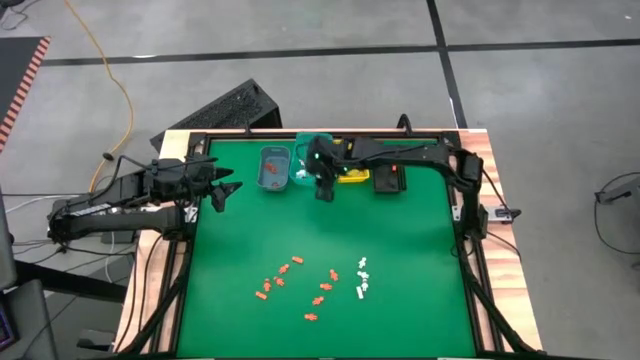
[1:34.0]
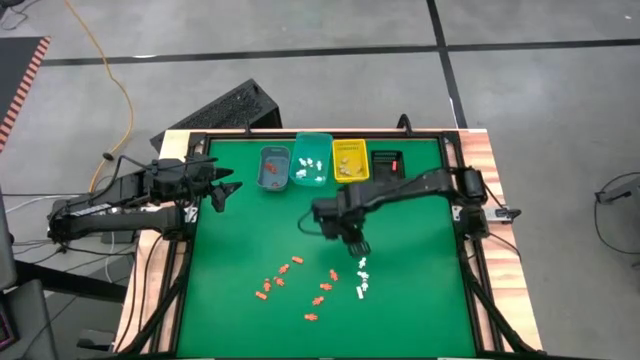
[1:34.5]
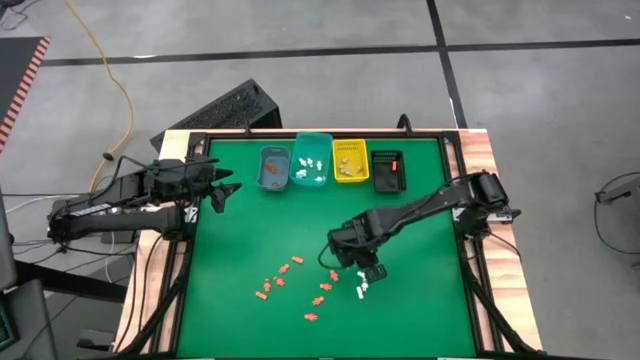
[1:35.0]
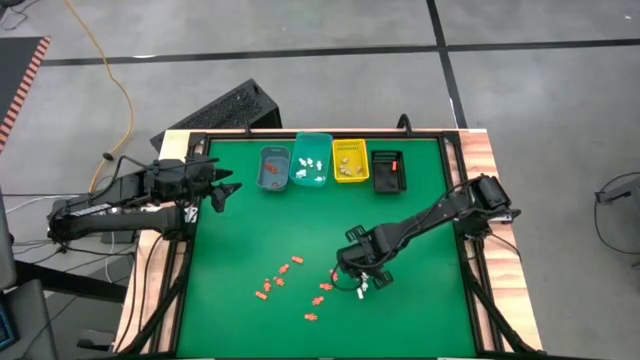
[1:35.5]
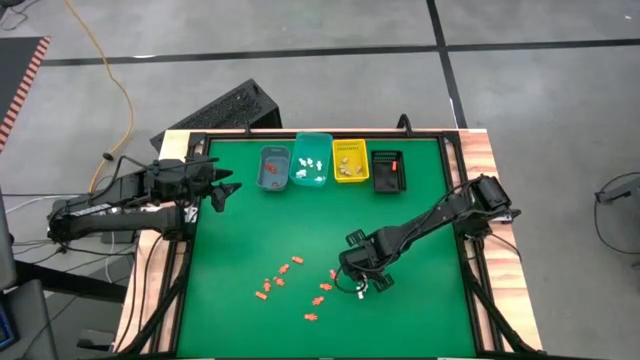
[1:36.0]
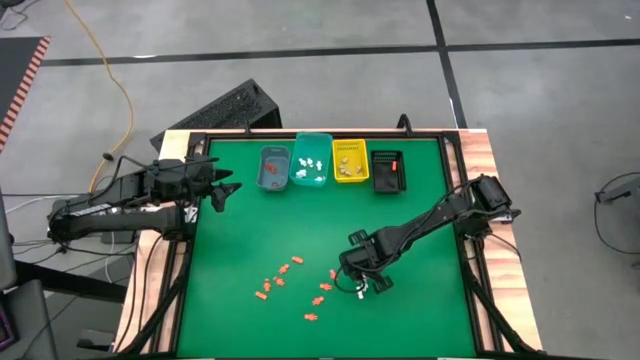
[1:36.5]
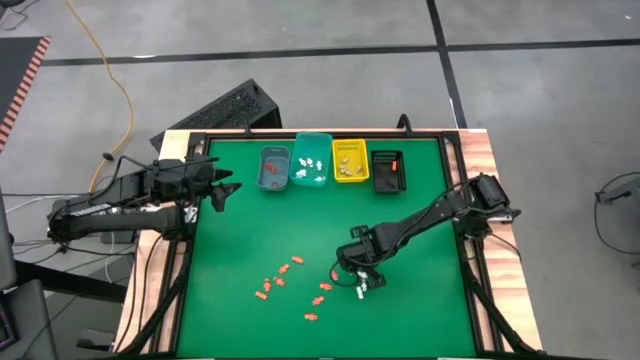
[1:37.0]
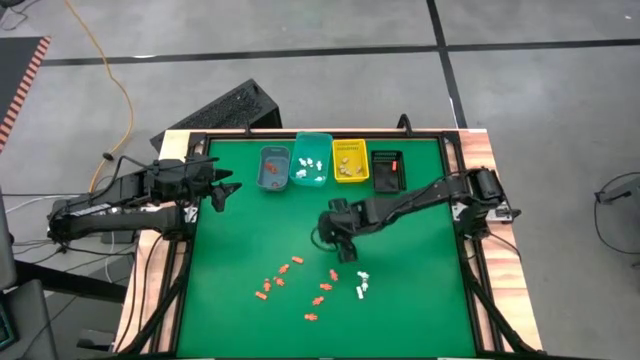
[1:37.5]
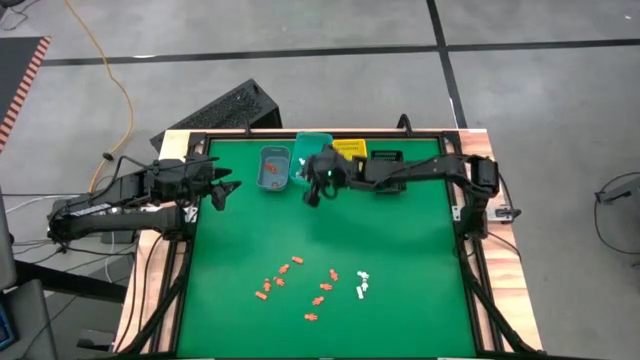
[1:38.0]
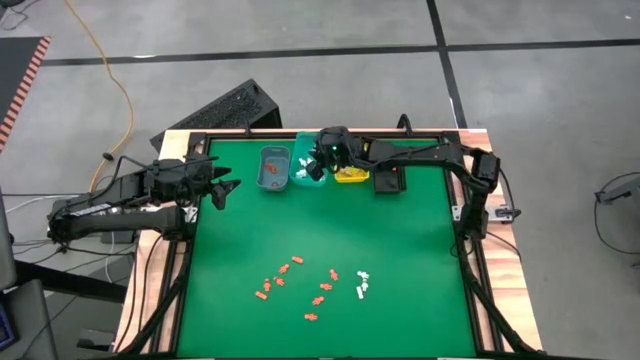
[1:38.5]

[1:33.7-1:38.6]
Task: Sort Halloween decoration
Put the white skeleton toy into the blue transparent bin

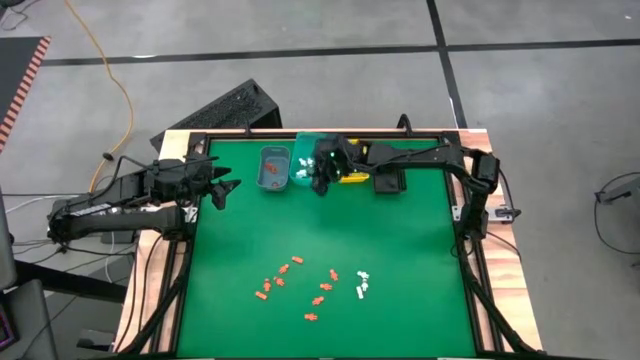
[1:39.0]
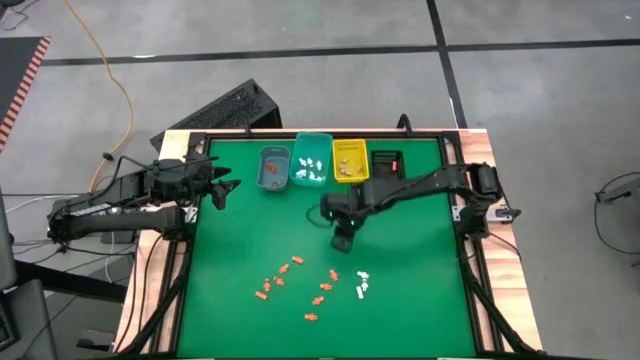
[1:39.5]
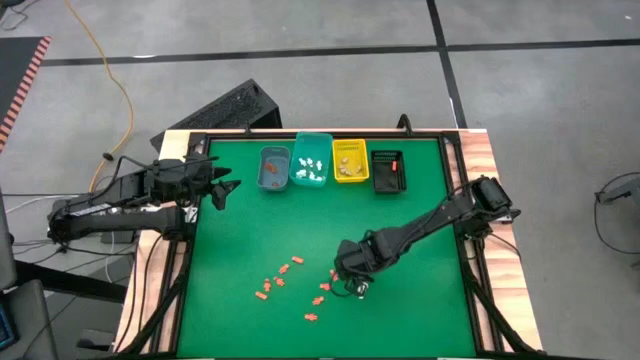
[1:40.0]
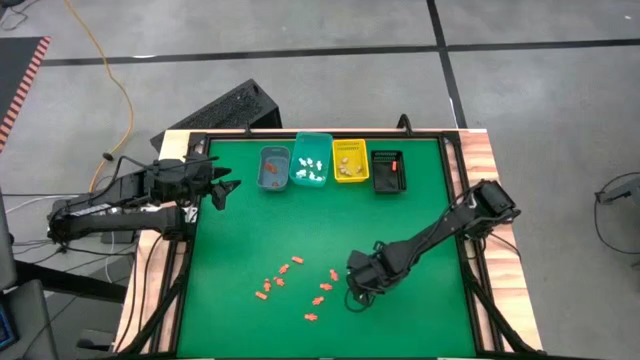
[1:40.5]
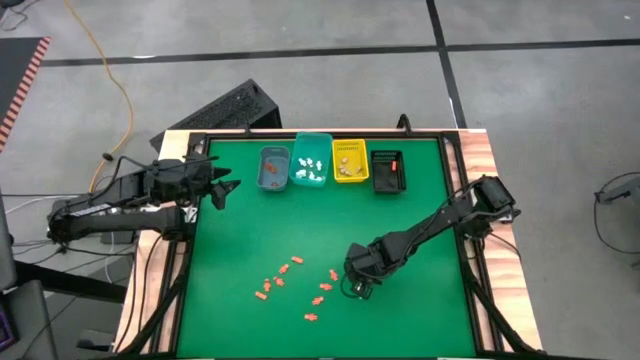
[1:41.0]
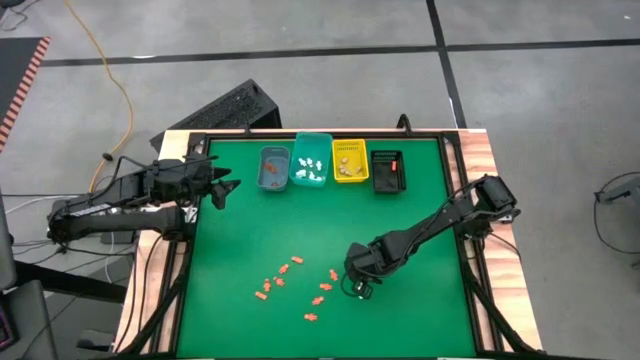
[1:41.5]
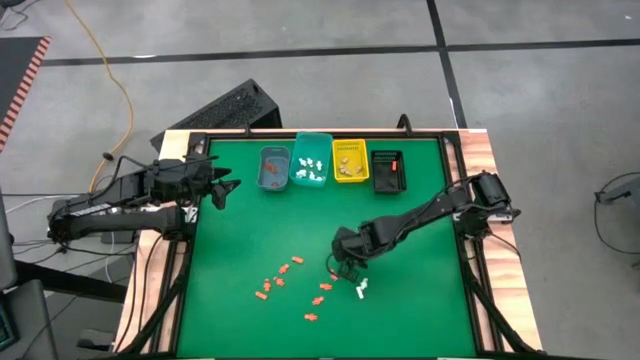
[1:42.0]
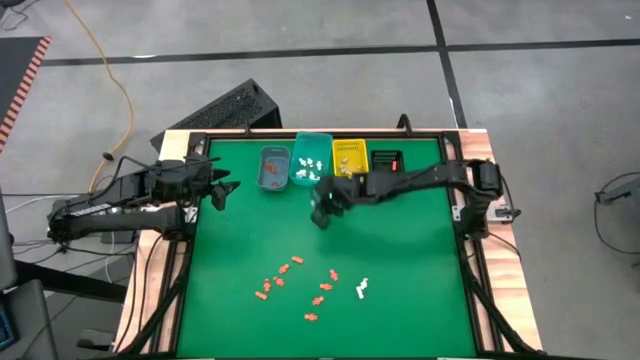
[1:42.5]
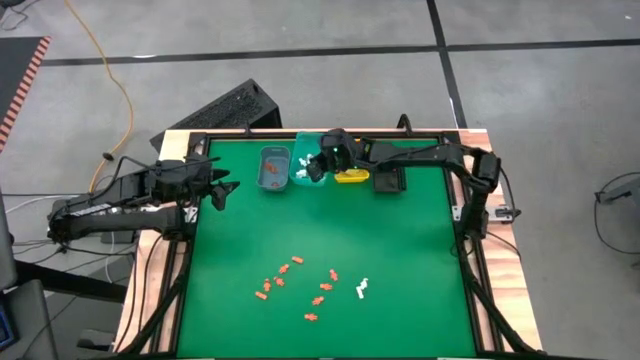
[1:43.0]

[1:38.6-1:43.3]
Put the white skeleton toy into the blue transparent bin

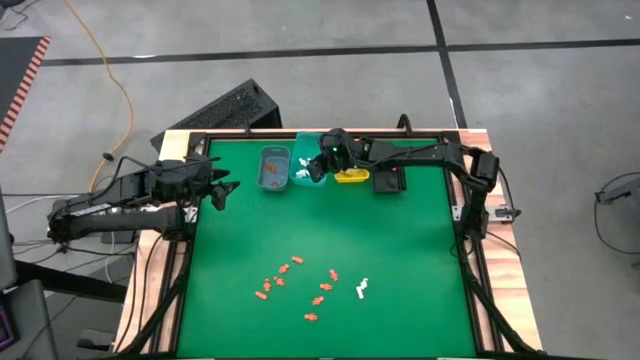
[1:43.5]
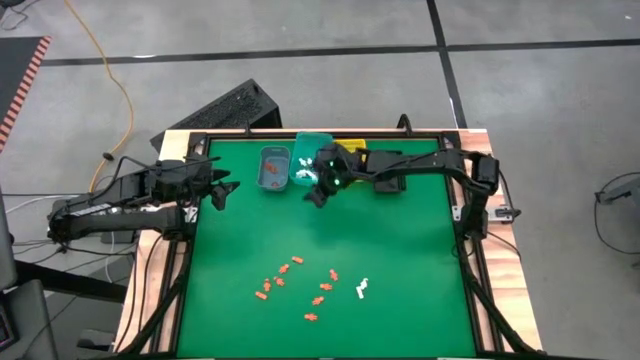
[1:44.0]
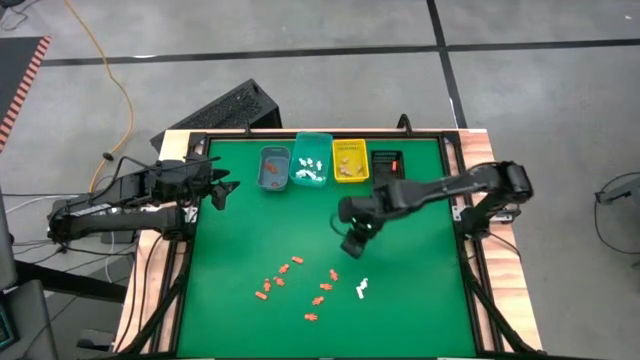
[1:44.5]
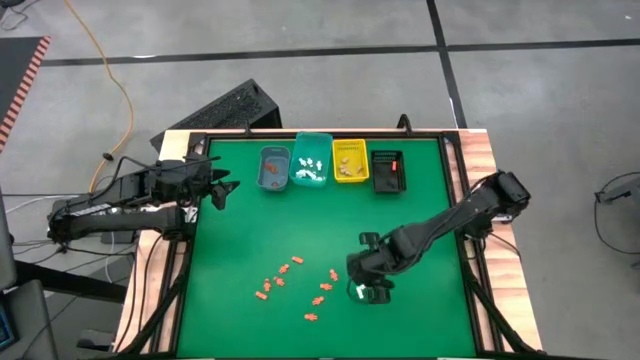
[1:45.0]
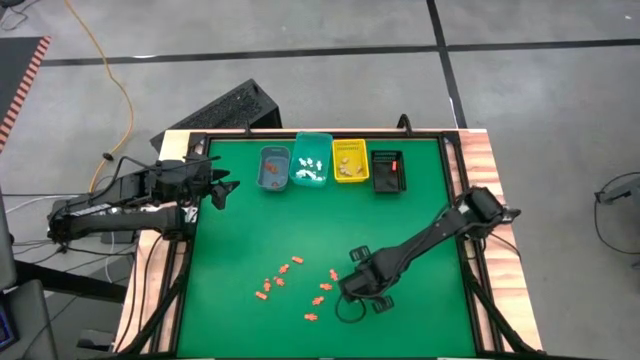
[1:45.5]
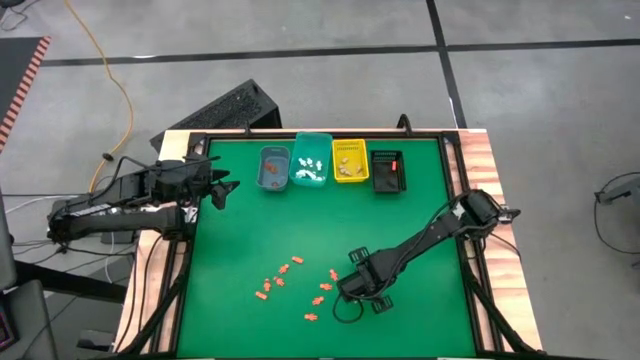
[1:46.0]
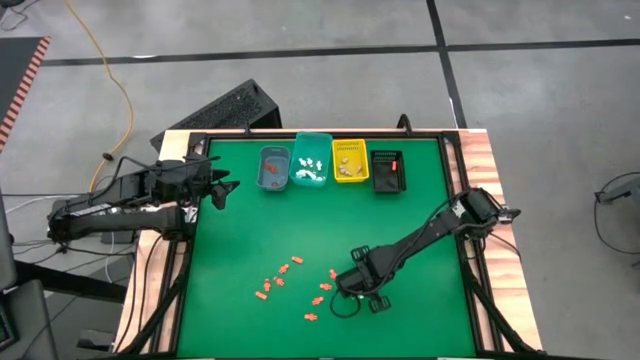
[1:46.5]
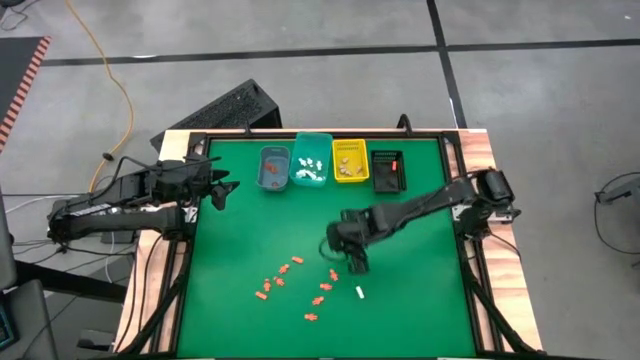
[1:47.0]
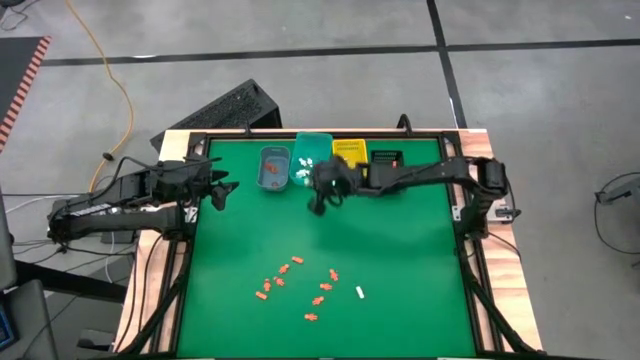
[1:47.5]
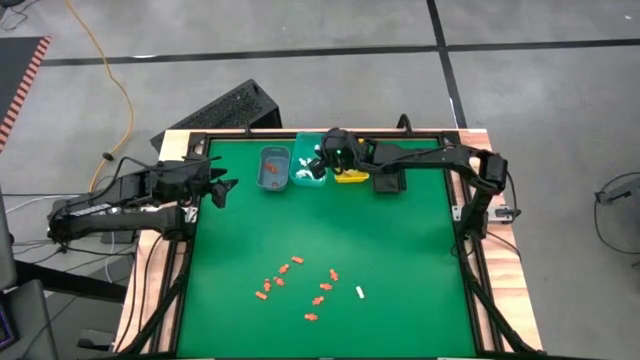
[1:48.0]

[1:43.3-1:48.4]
Put the white skeleton toy into the blue transparent bin

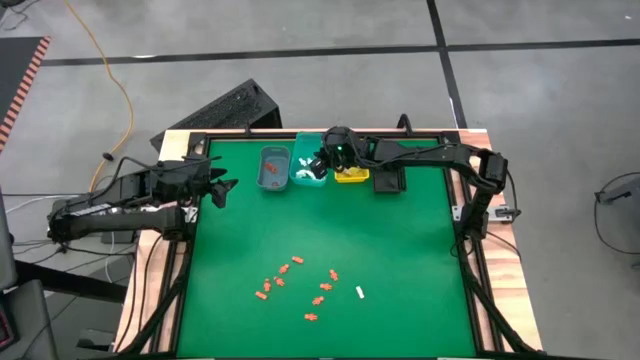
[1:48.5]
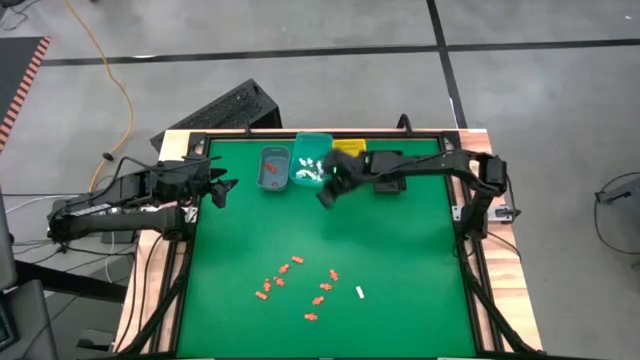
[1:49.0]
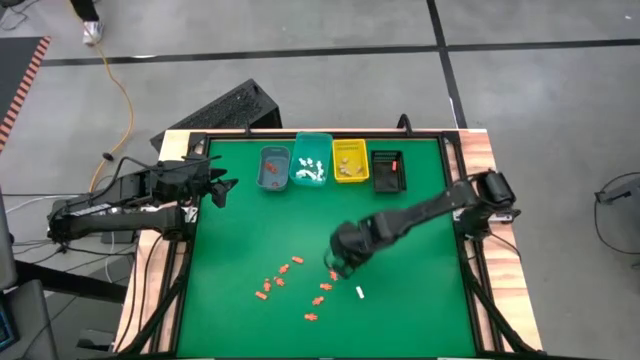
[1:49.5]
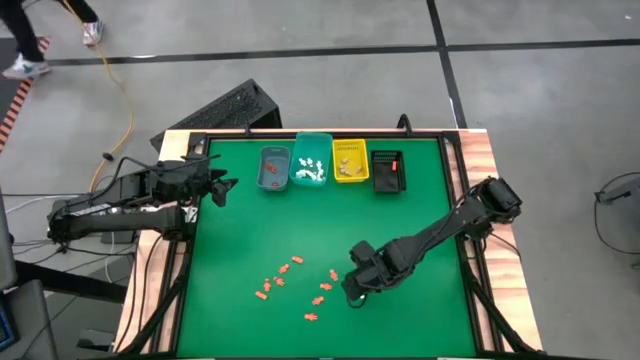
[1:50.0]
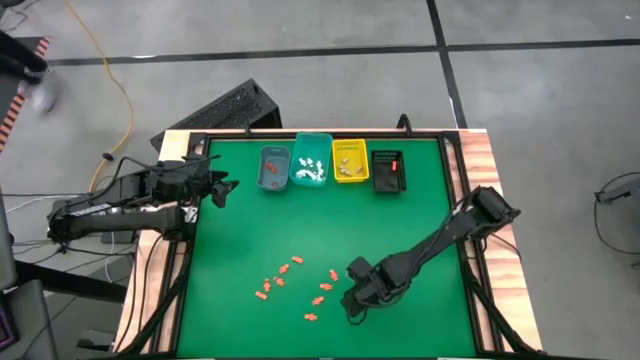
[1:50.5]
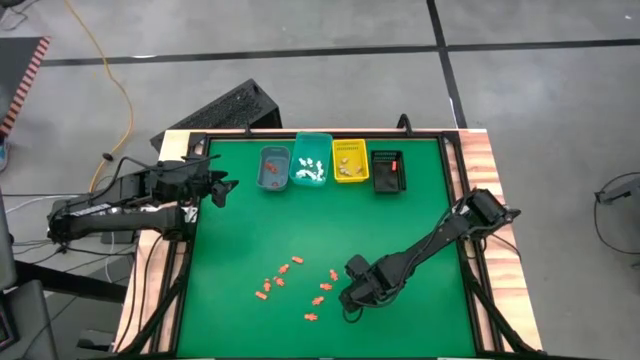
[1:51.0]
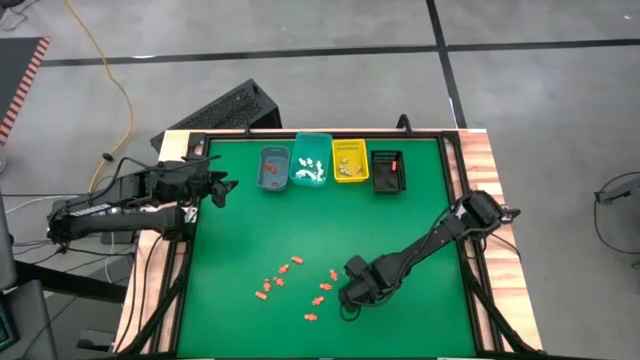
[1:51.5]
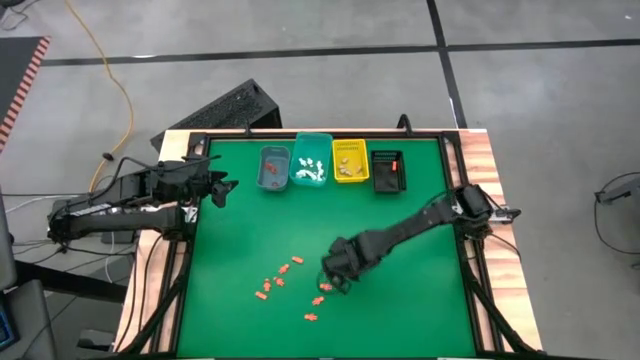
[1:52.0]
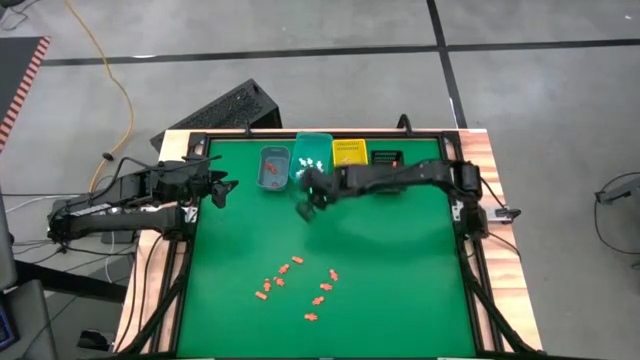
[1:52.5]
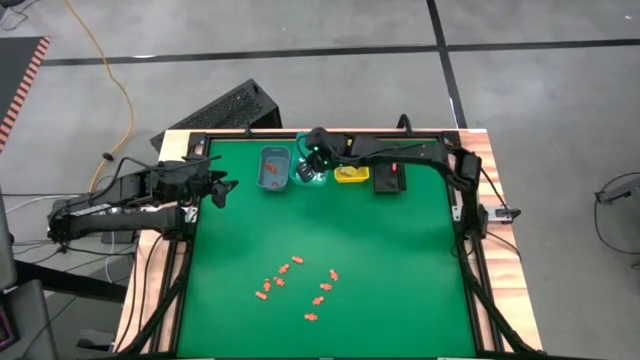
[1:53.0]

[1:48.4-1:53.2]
Put the white skeleton toy into the blue transparent bin

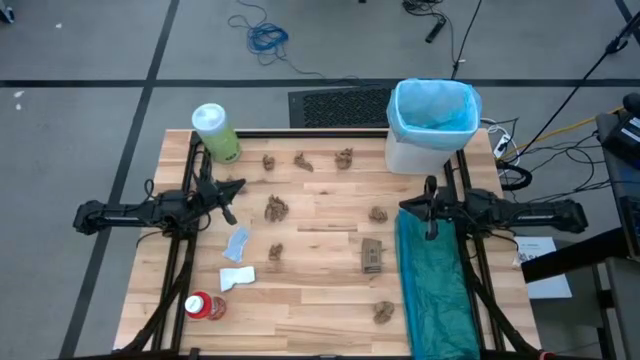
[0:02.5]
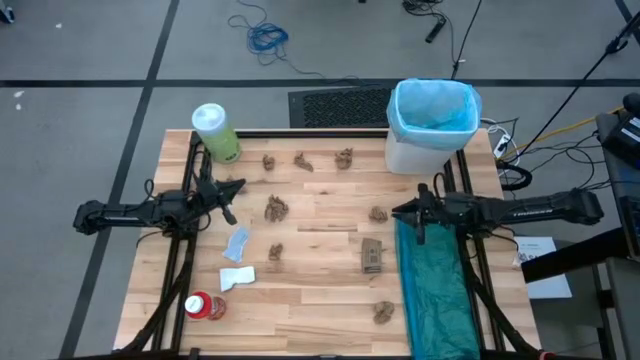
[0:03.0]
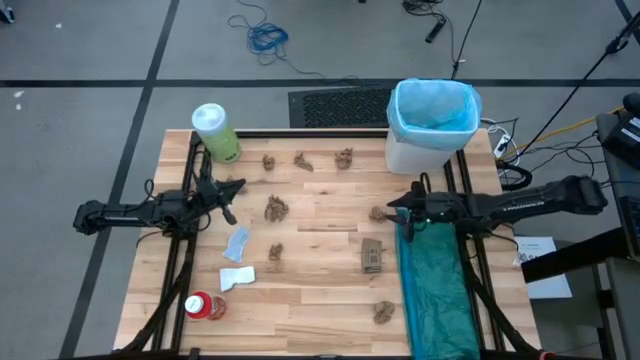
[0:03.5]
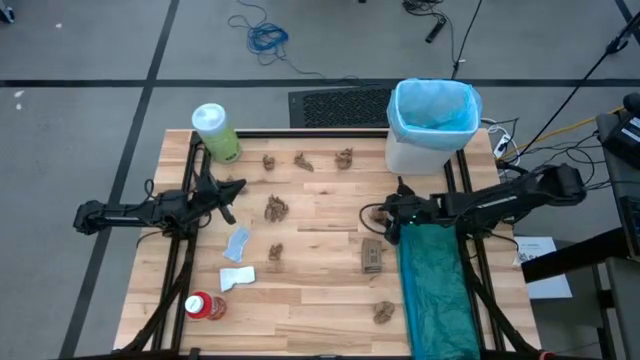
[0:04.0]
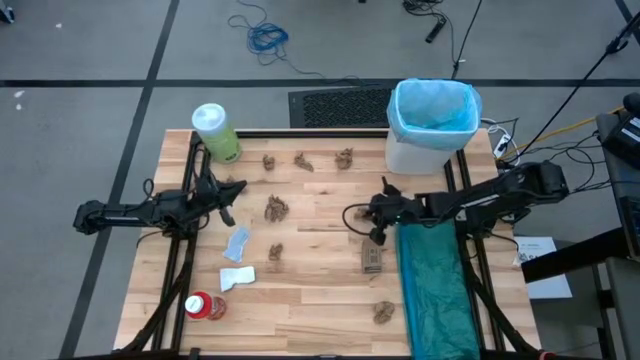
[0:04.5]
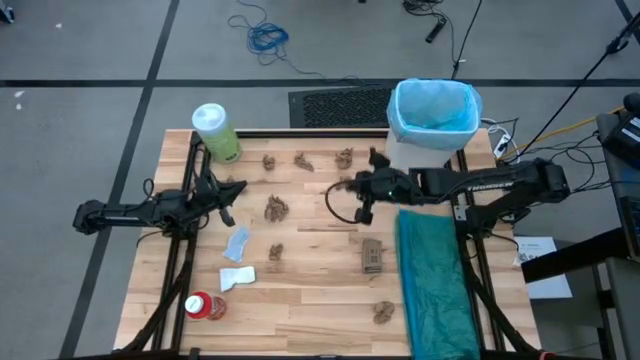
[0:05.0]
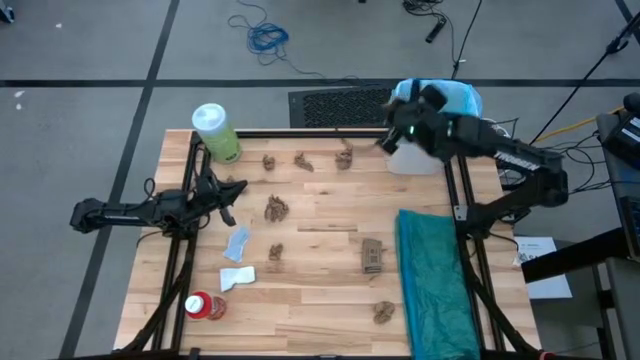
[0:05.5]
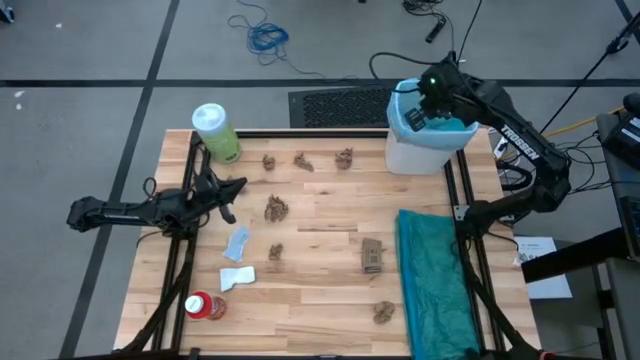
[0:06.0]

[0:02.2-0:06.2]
Task: place trash/remove bag and relplace
Put the brown paper trash into the trash bin
